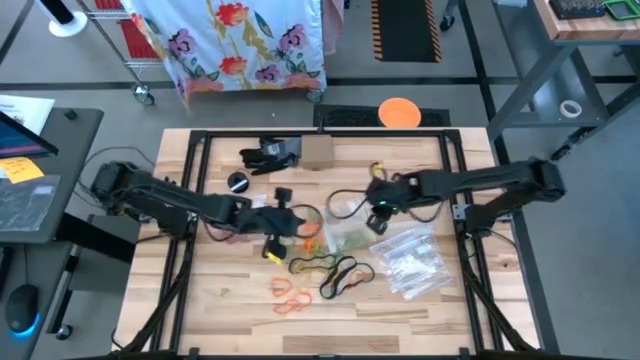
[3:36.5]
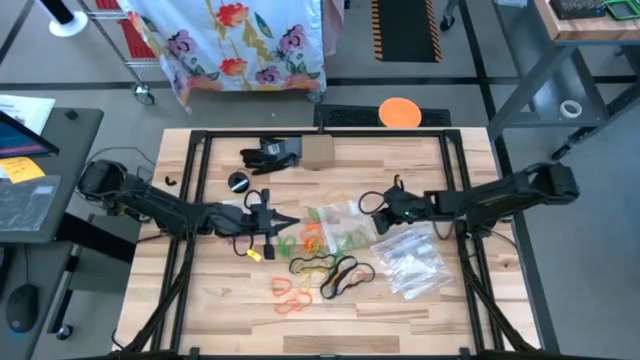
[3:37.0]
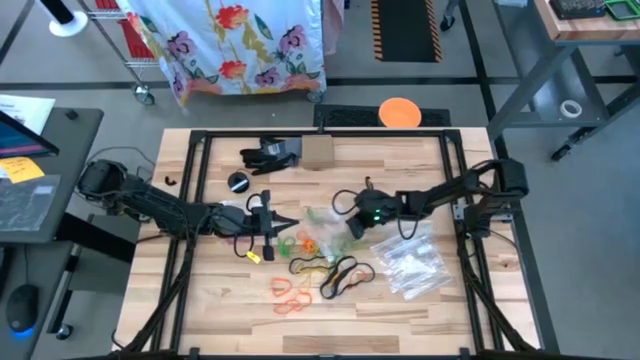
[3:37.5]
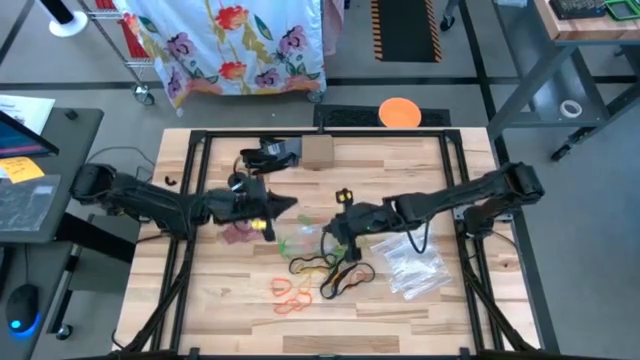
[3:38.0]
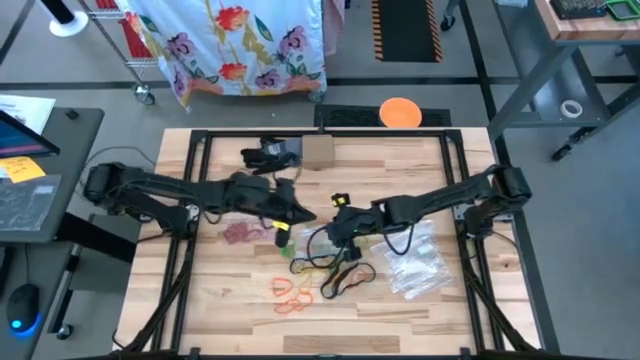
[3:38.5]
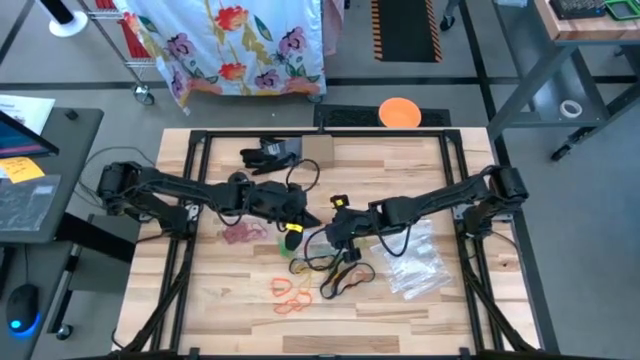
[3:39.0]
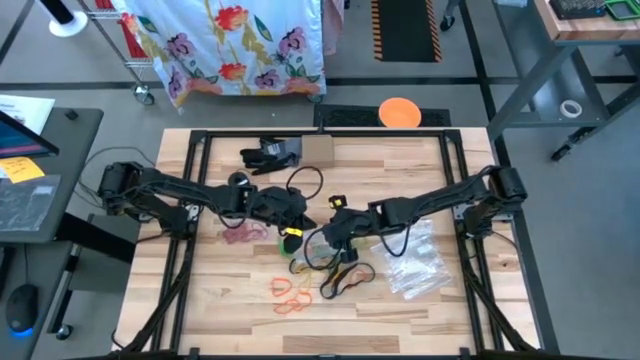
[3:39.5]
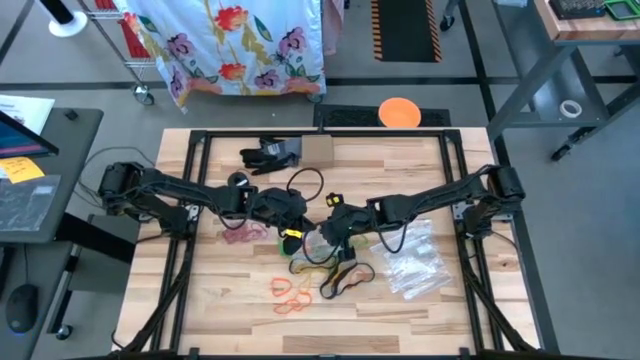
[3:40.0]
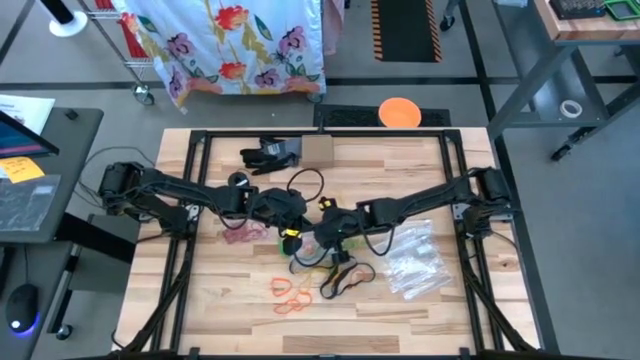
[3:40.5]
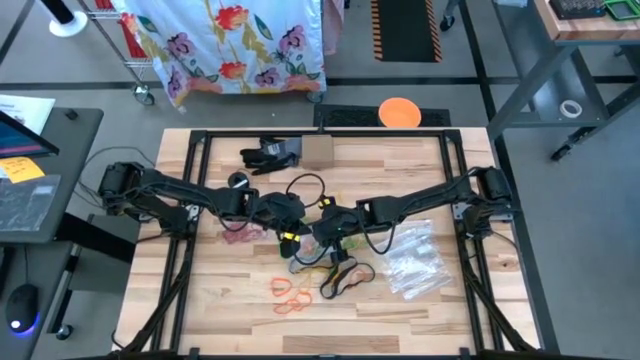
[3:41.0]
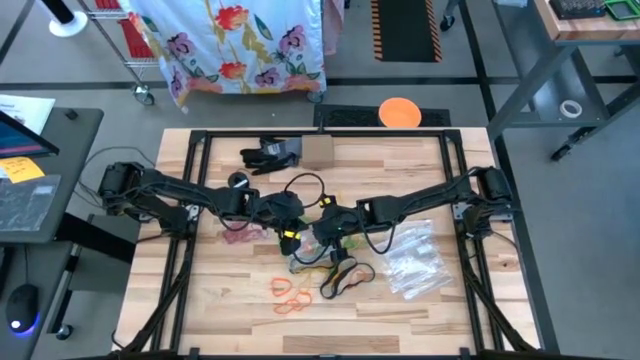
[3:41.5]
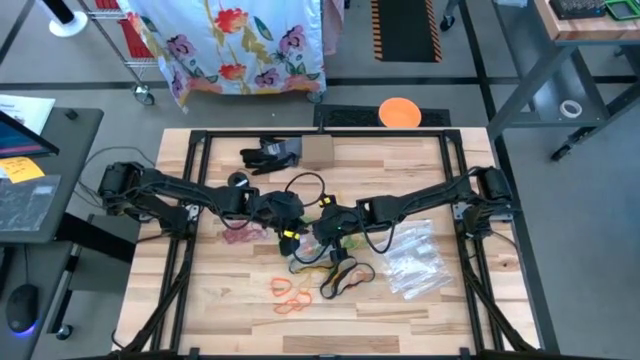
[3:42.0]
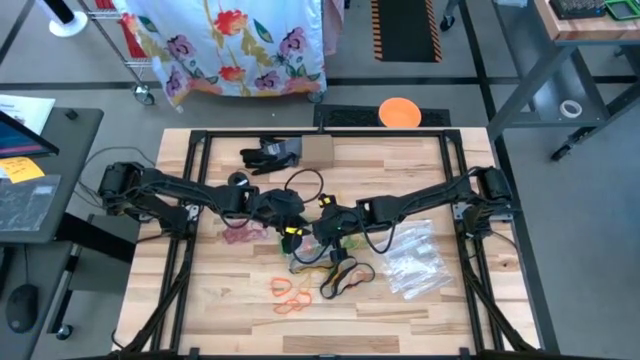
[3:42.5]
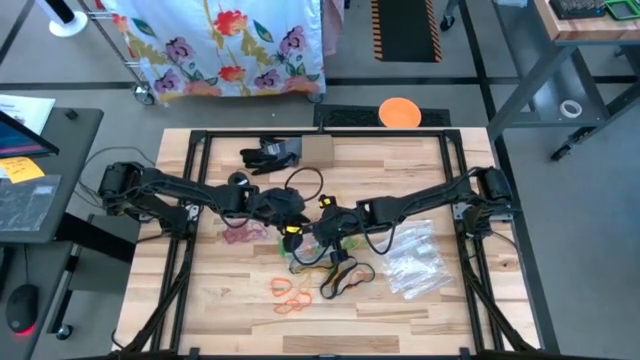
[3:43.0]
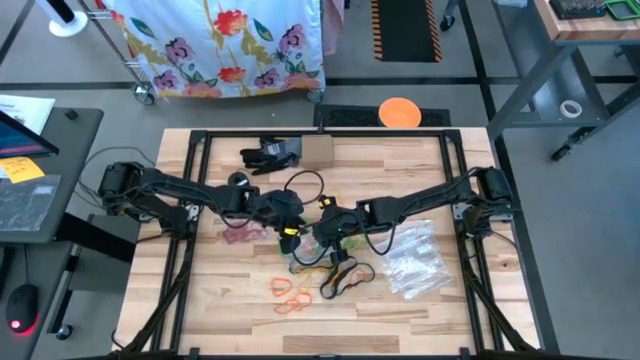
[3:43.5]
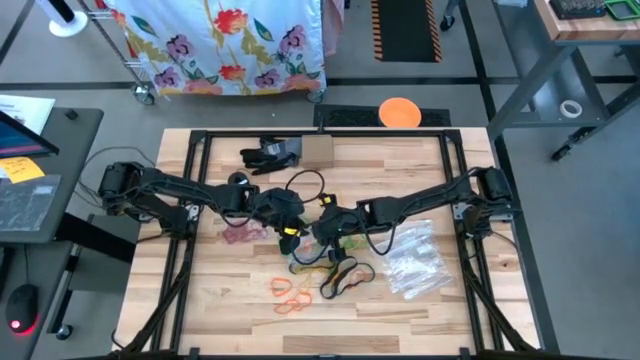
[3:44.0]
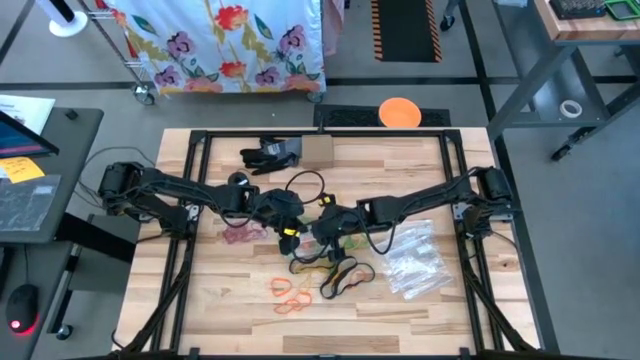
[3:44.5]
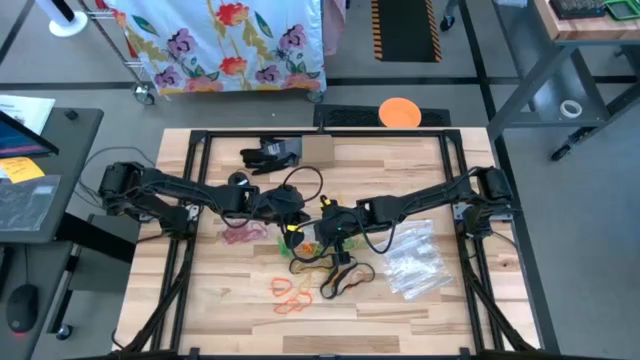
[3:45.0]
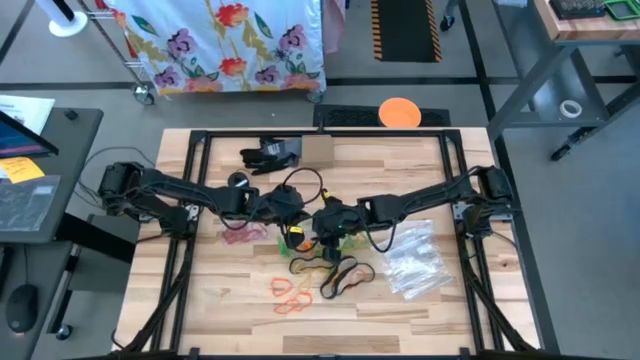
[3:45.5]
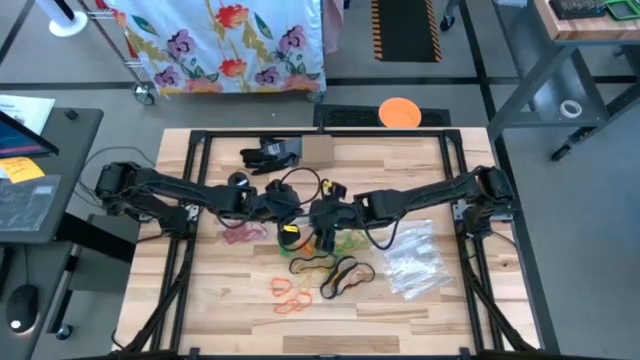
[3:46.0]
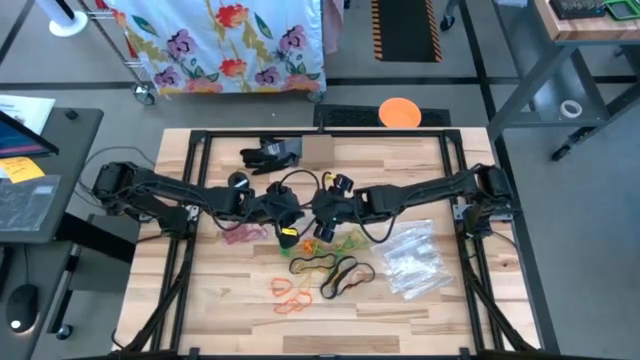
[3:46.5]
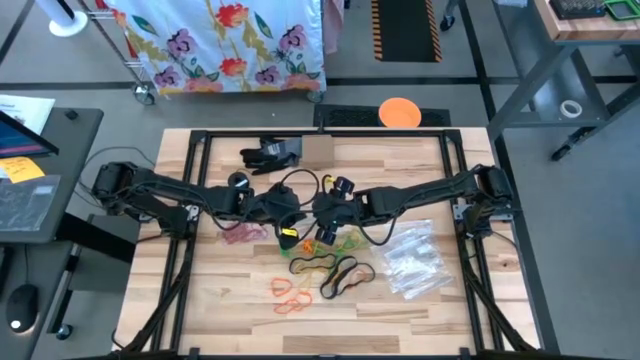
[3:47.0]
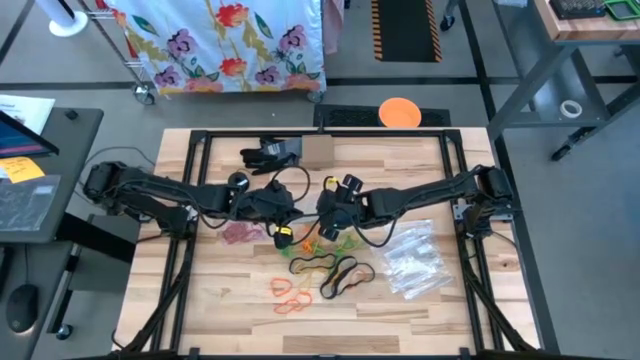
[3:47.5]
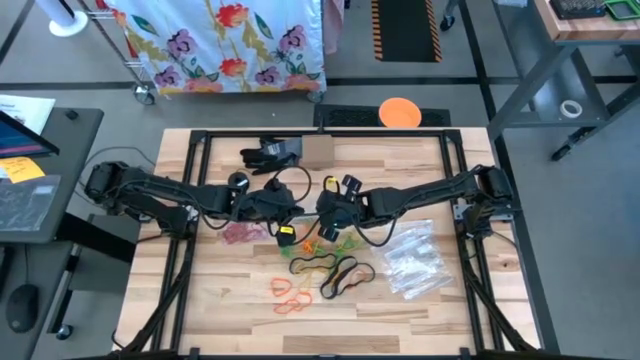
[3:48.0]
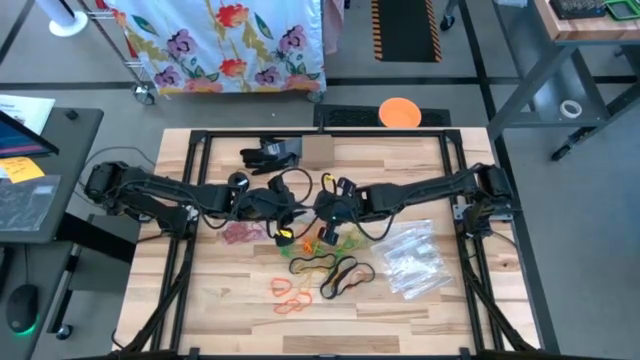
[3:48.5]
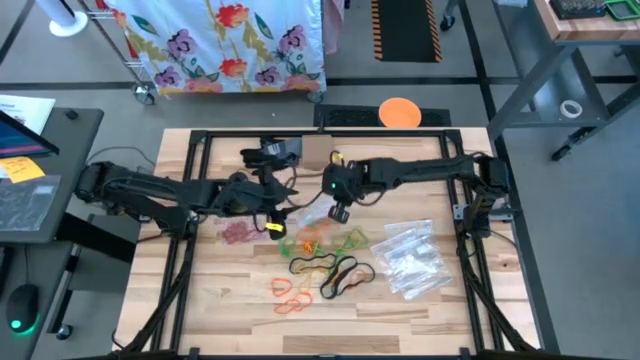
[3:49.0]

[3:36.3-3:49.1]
Task: Sort rubber bands
Open the transparent zip bag

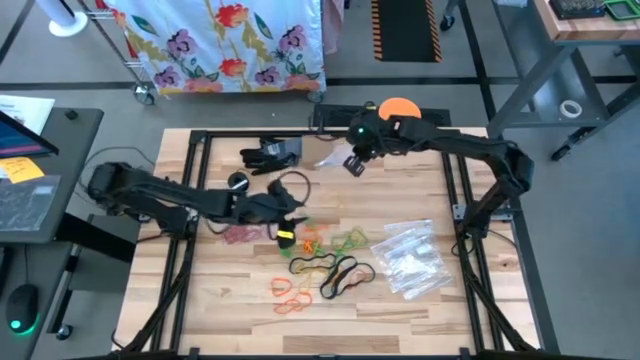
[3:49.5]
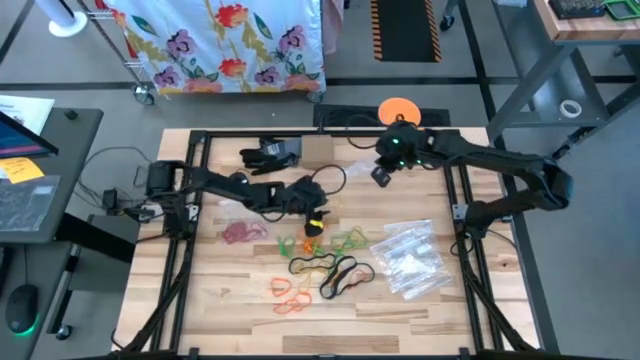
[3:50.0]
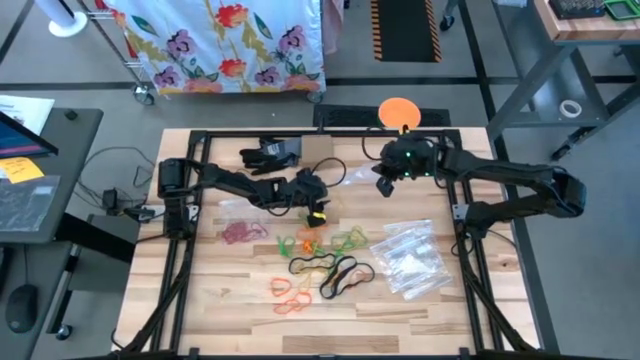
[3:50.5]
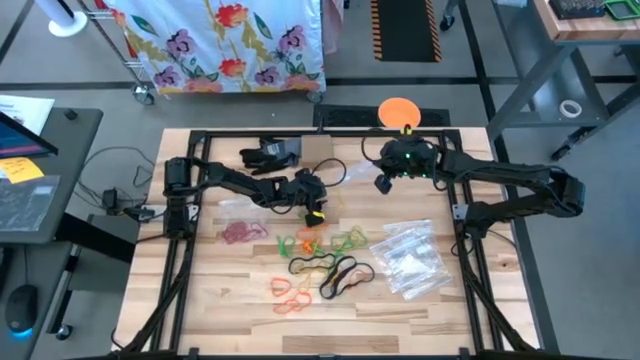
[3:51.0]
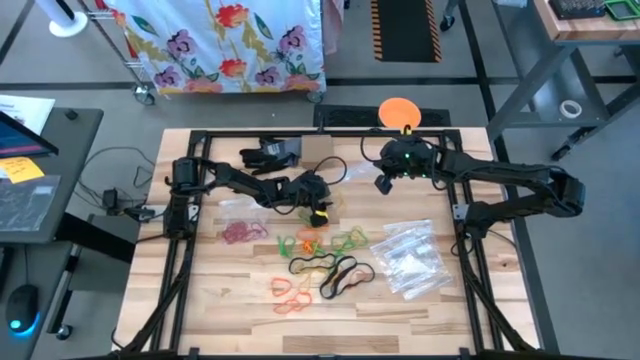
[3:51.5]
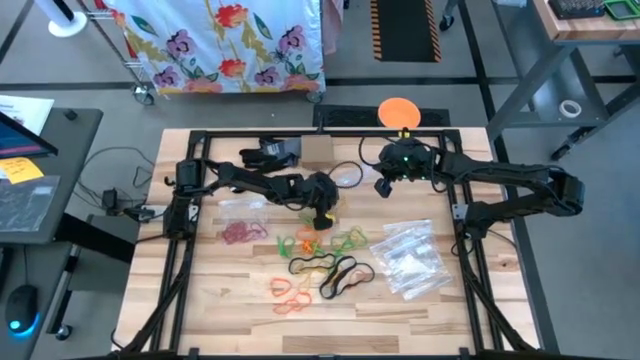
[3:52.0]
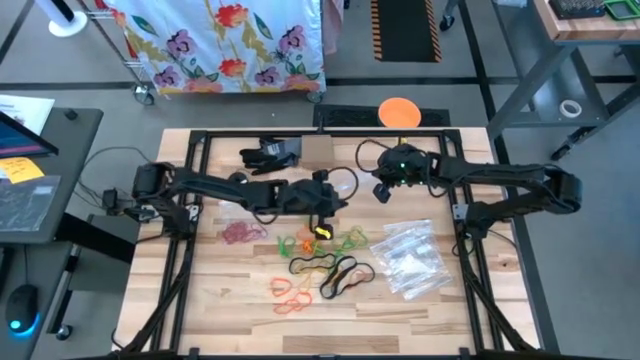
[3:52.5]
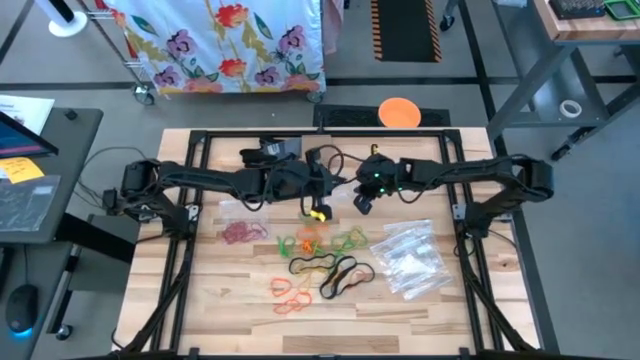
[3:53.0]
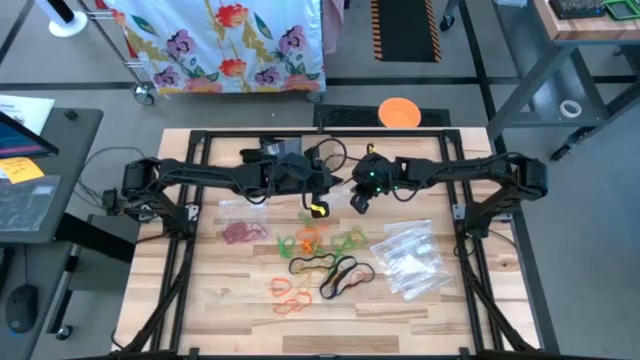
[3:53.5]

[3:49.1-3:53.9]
Put the yellow rubber band into the transparent zip bag

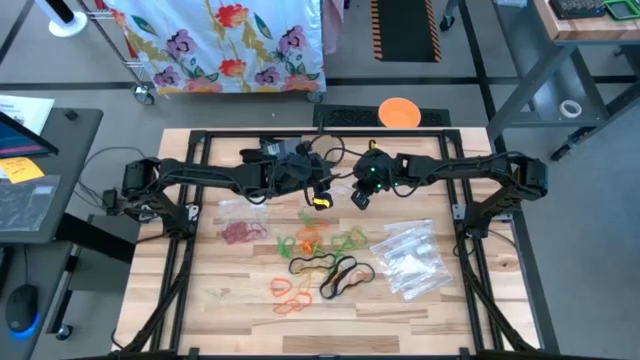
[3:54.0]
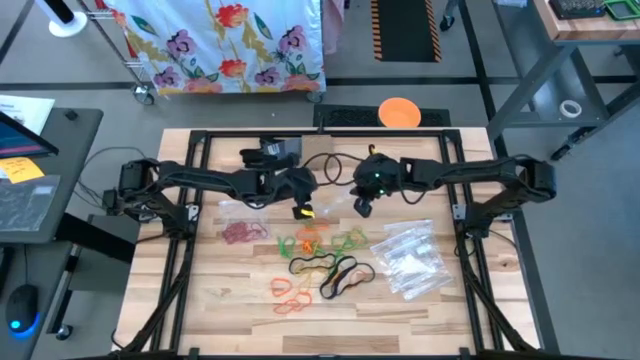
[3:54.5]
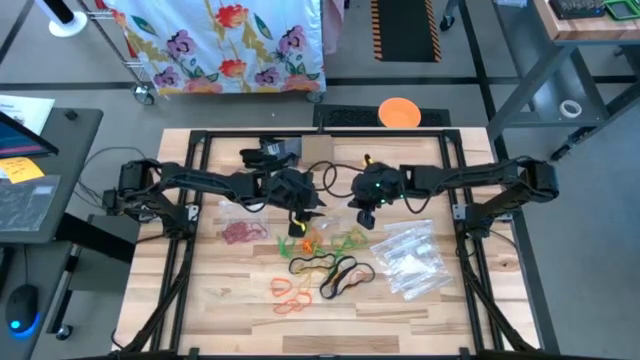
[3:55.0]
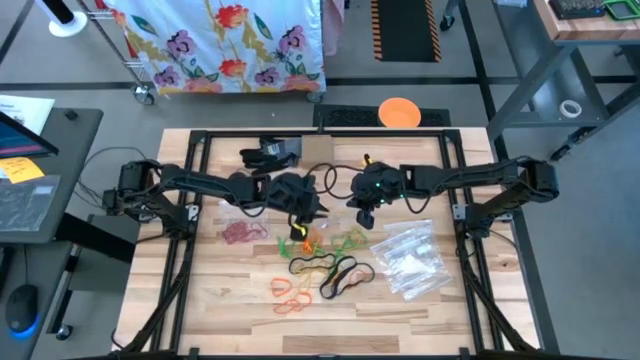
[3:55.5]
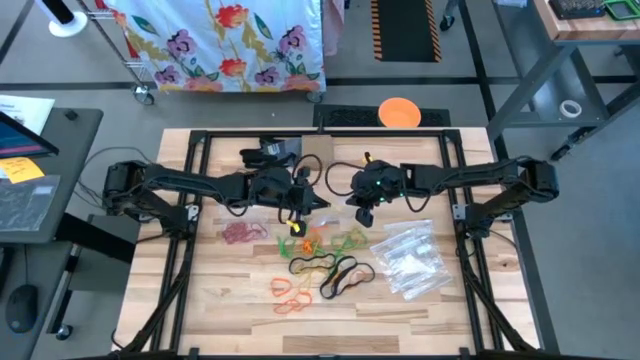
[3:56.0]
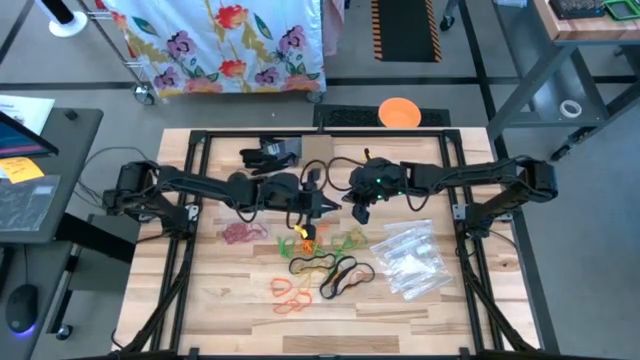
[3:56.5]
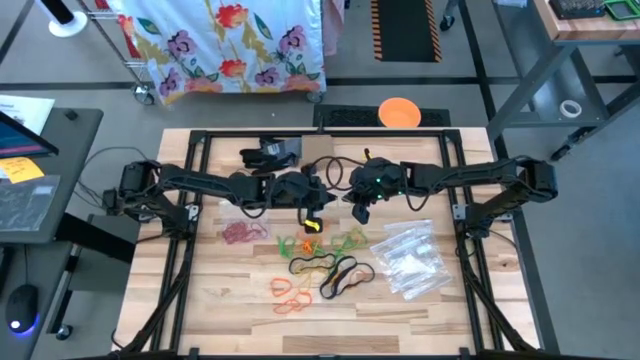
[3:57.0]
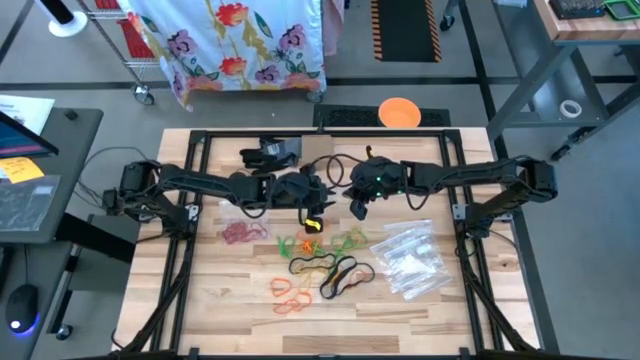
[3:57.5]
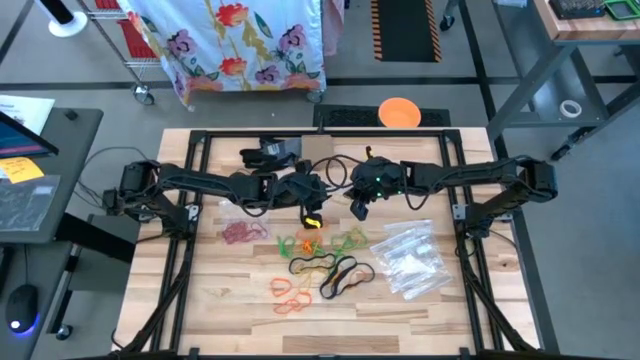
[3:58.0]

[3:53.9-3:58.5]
Put the yellow rubber band into the transparent zip bag

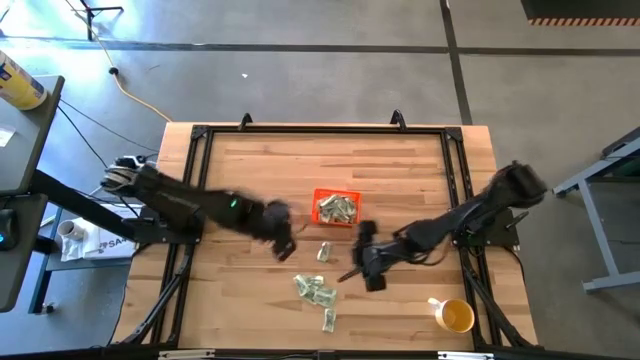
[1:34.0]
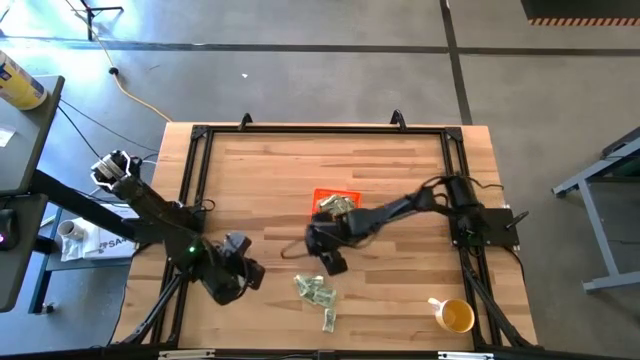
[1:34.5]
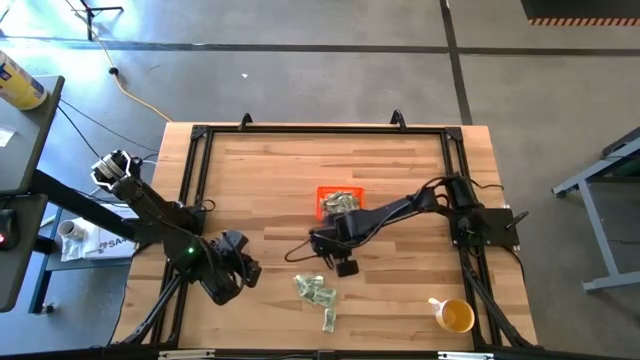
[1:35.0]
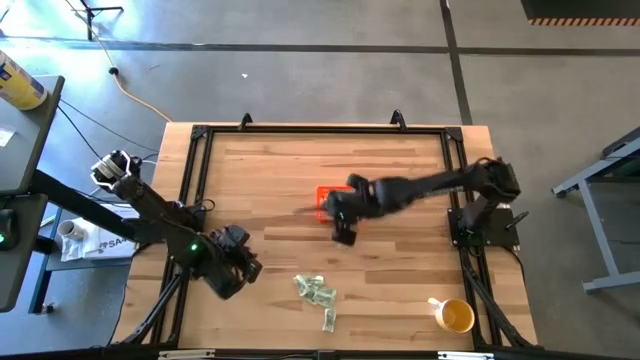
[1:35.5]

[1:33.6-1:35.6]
Task: Pick and place Stevia / Truvia into bins
Put the stevia packet into the orange bin
